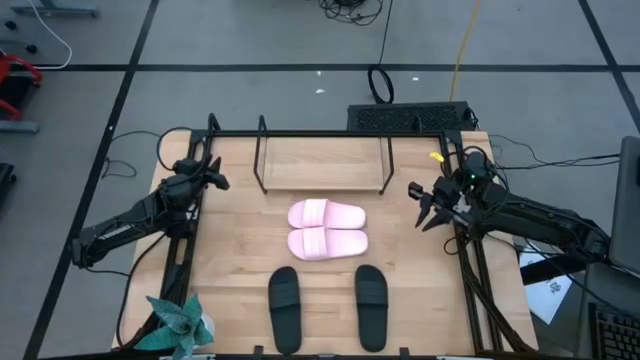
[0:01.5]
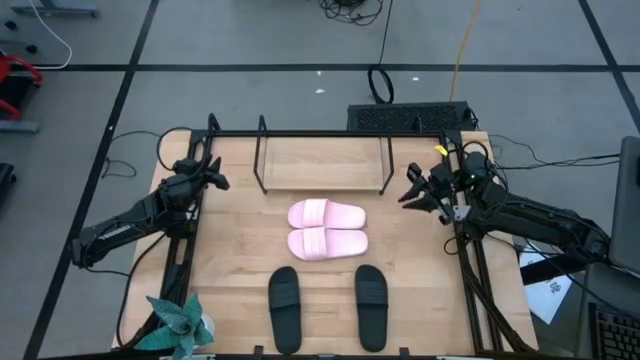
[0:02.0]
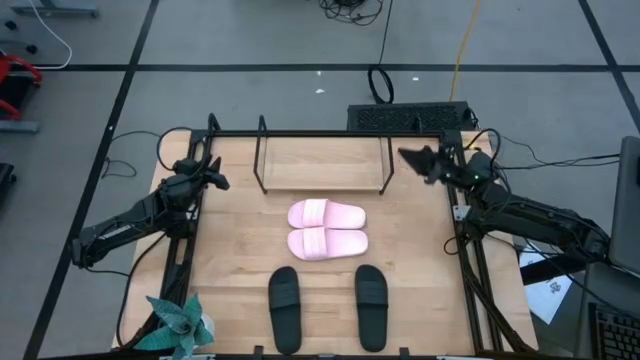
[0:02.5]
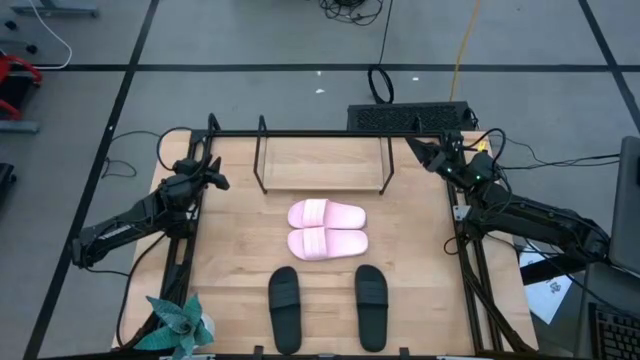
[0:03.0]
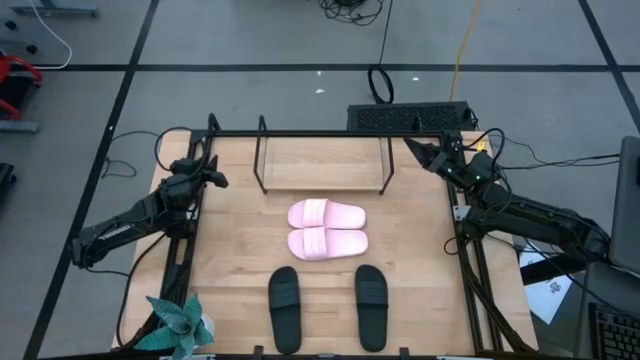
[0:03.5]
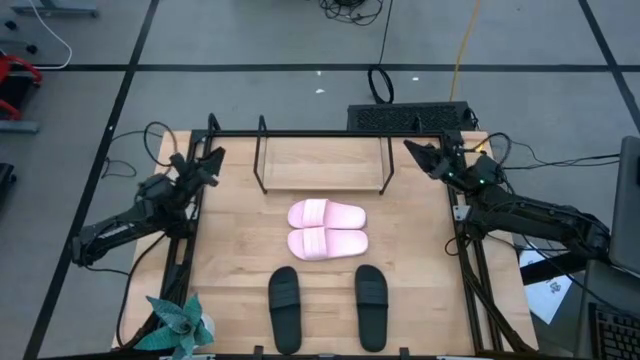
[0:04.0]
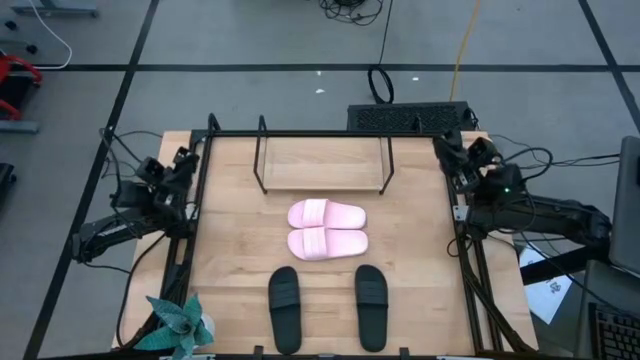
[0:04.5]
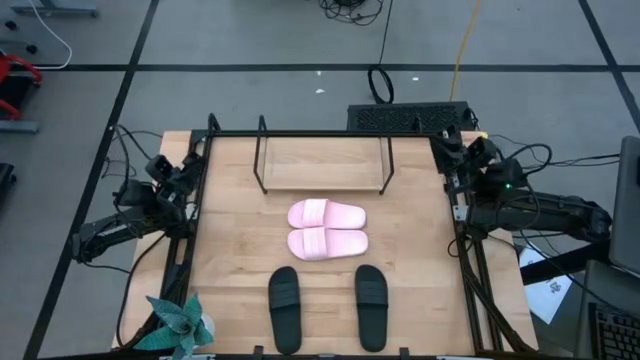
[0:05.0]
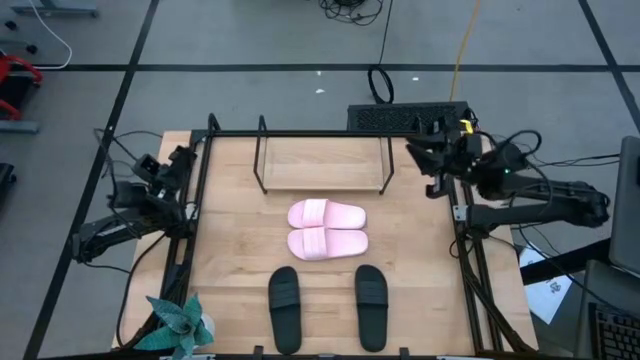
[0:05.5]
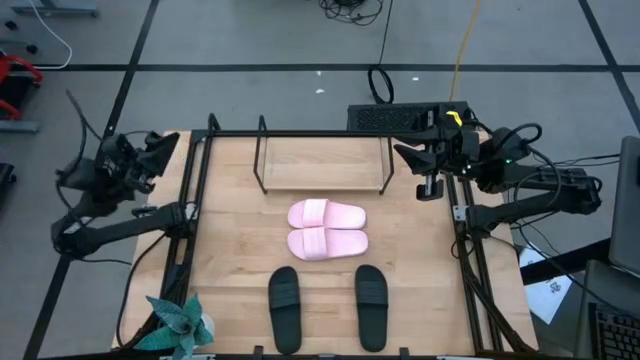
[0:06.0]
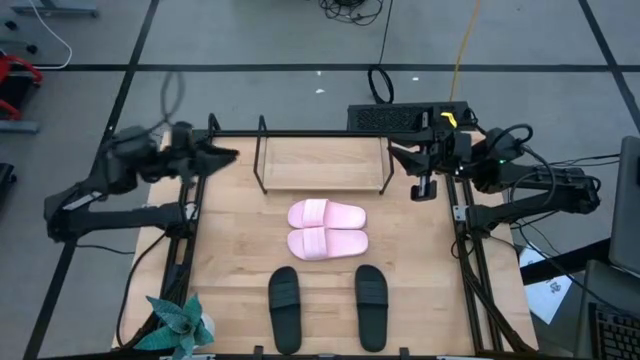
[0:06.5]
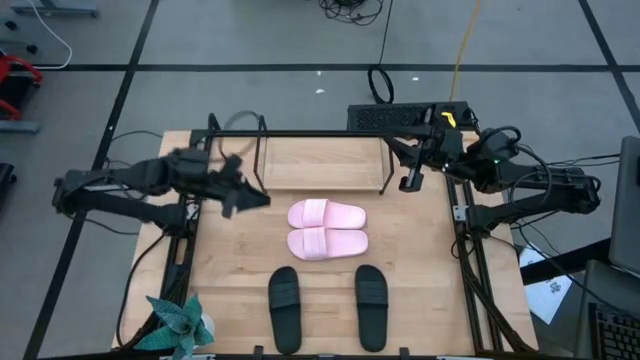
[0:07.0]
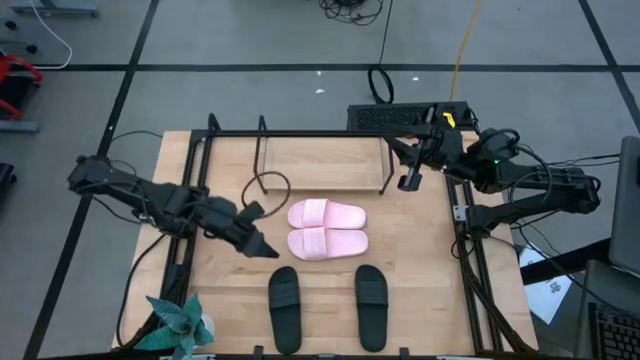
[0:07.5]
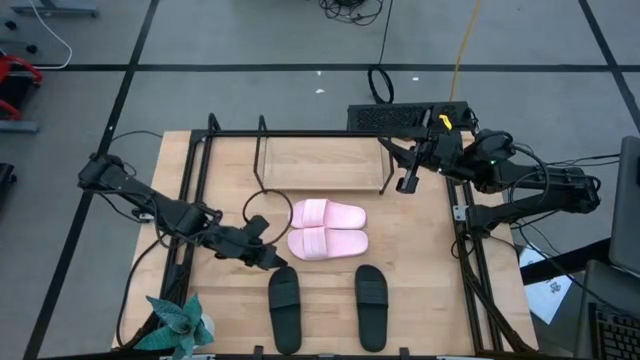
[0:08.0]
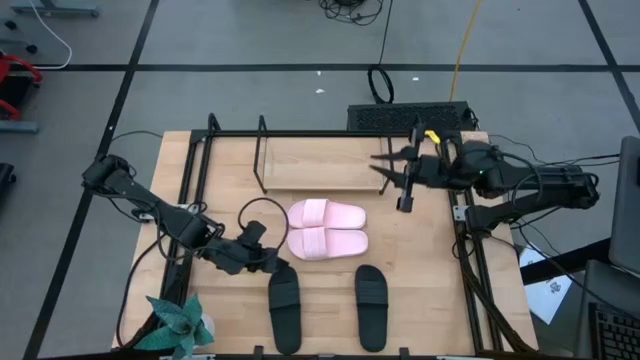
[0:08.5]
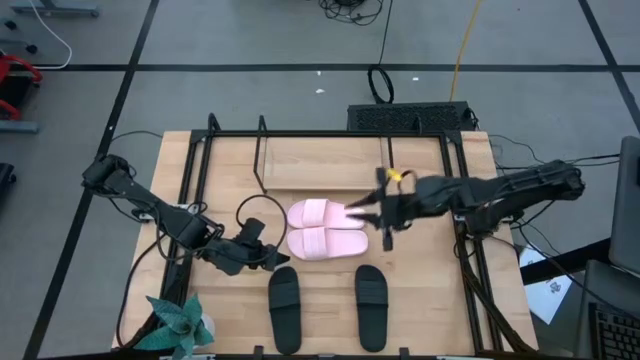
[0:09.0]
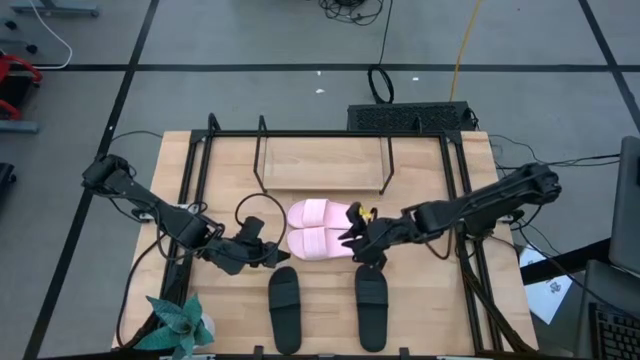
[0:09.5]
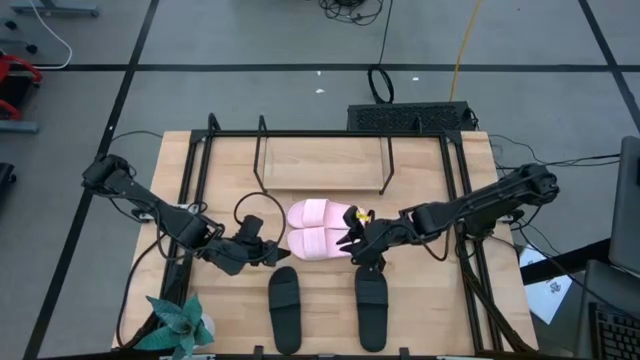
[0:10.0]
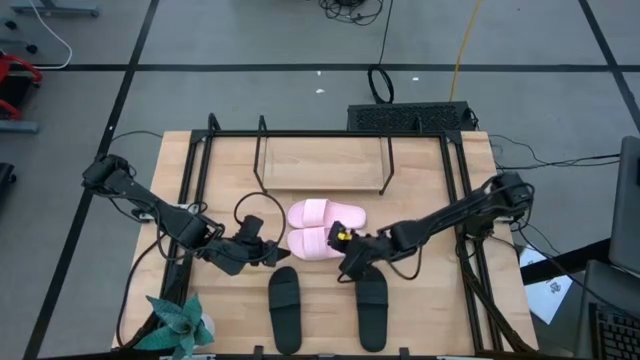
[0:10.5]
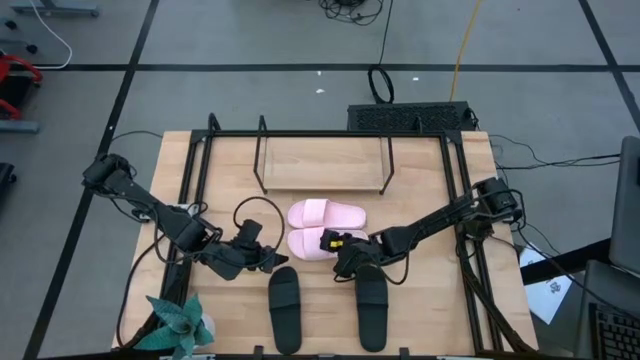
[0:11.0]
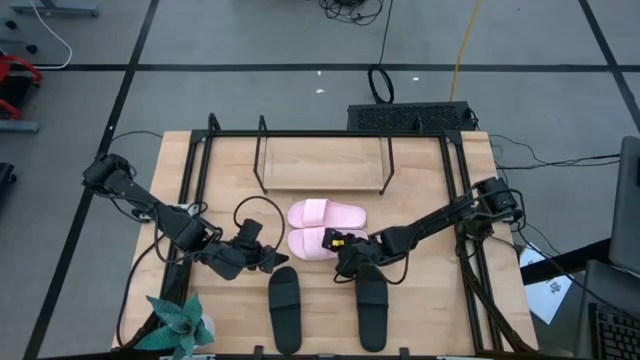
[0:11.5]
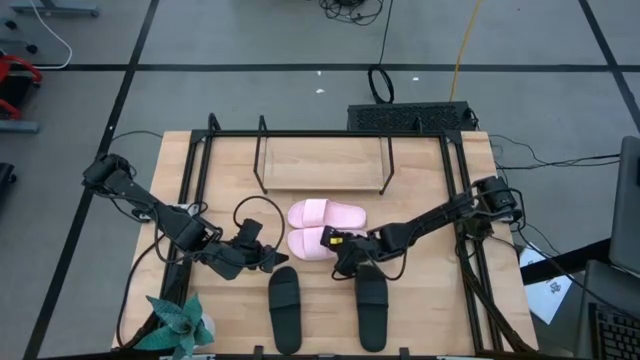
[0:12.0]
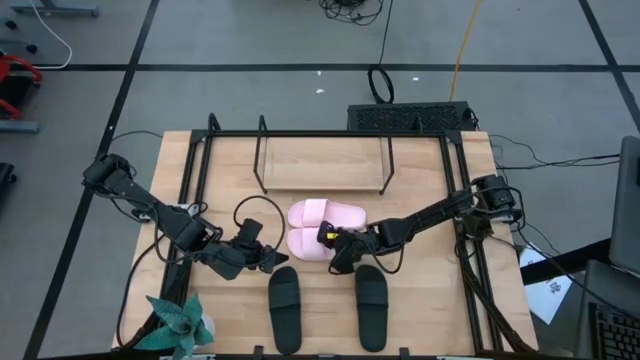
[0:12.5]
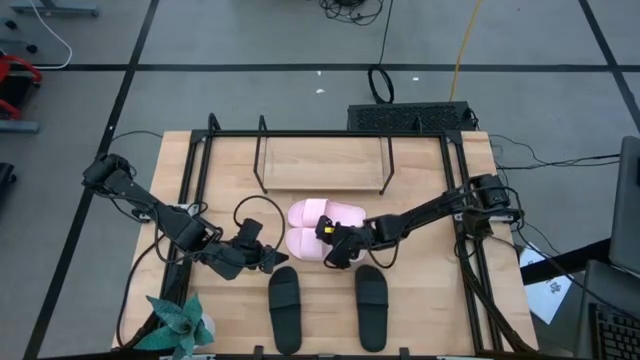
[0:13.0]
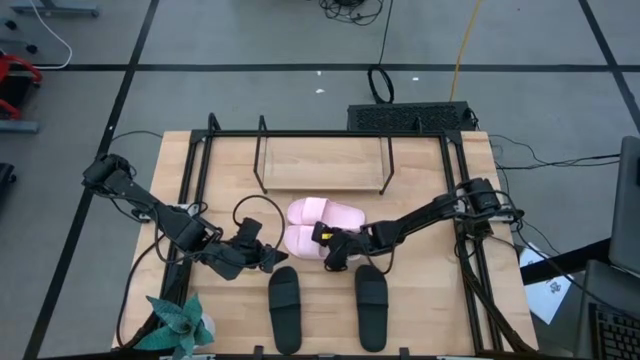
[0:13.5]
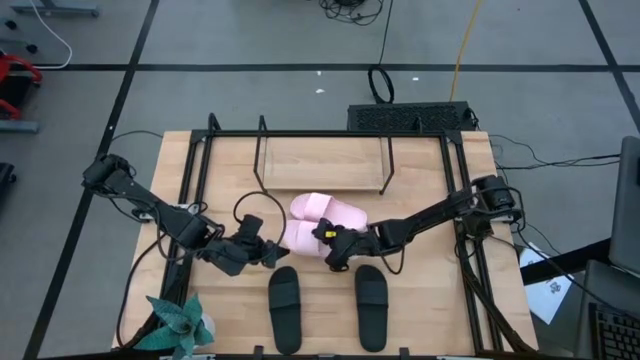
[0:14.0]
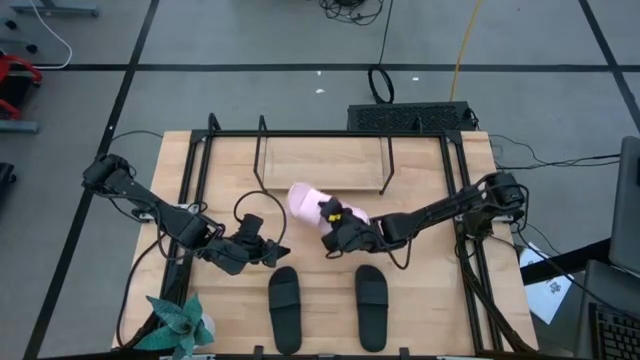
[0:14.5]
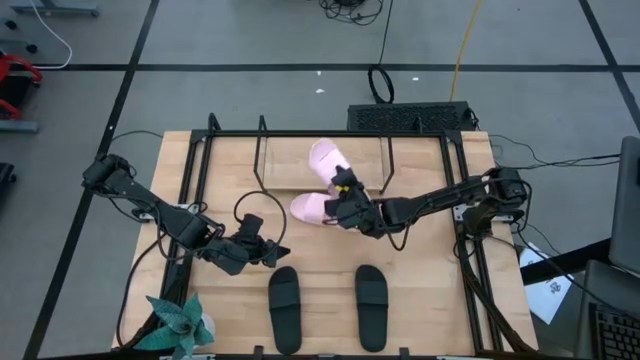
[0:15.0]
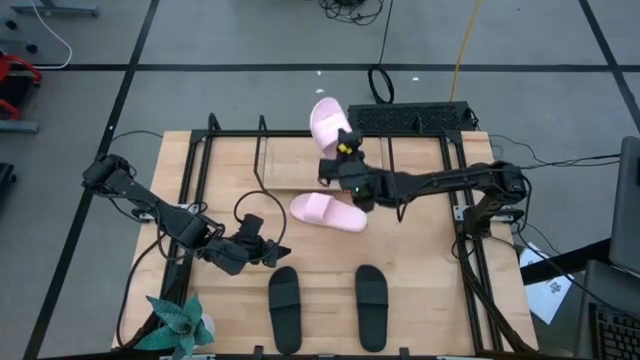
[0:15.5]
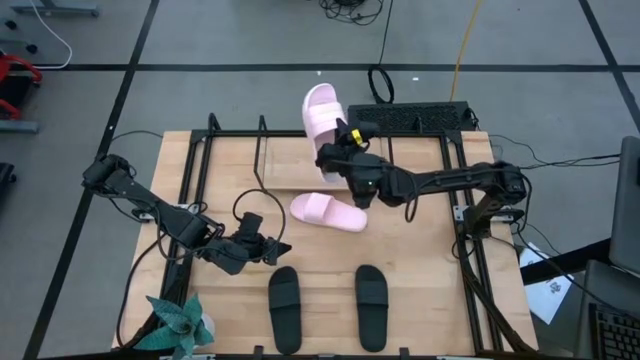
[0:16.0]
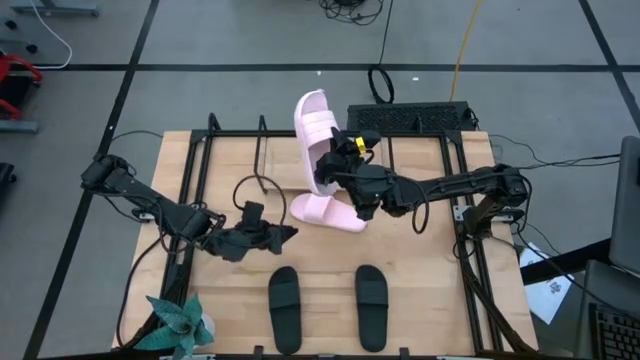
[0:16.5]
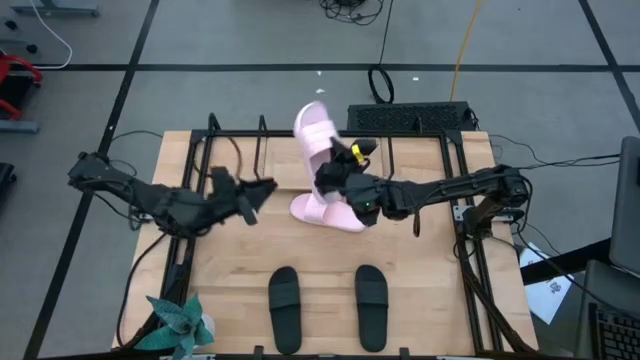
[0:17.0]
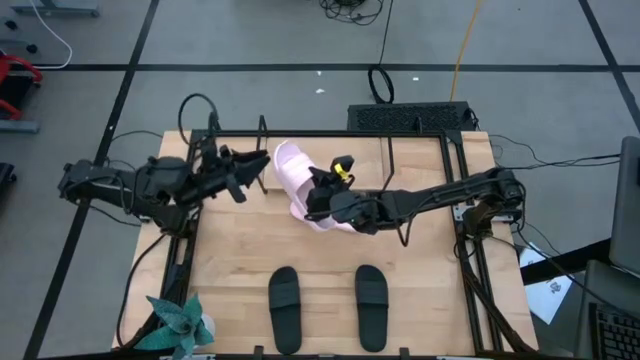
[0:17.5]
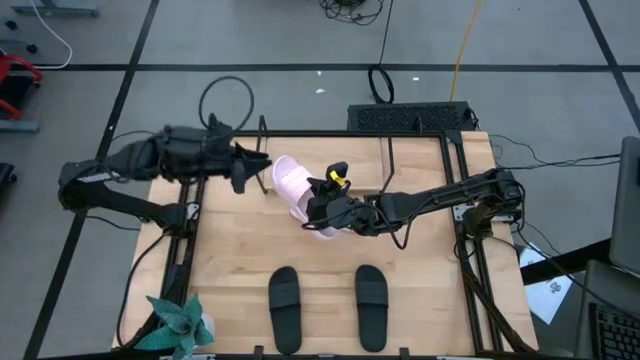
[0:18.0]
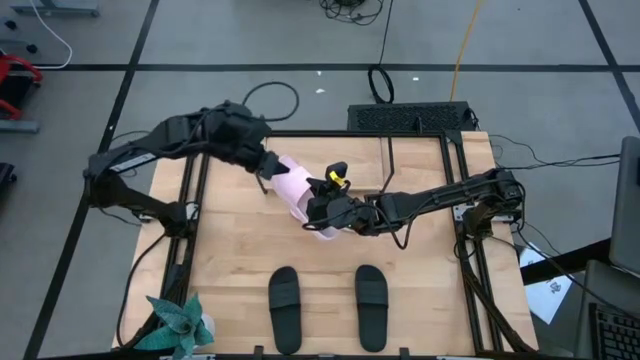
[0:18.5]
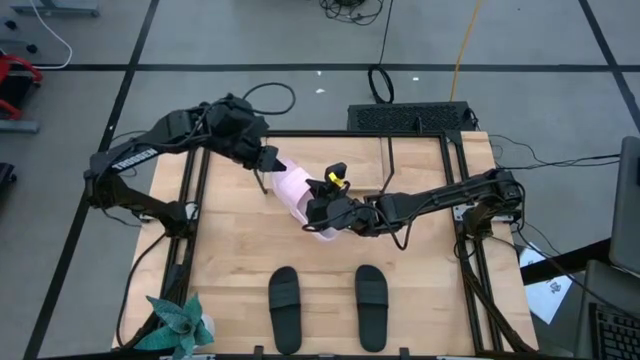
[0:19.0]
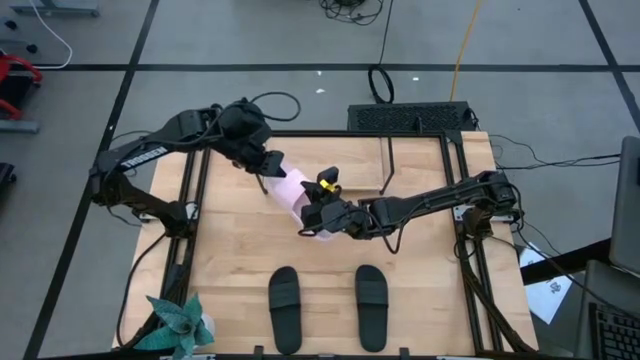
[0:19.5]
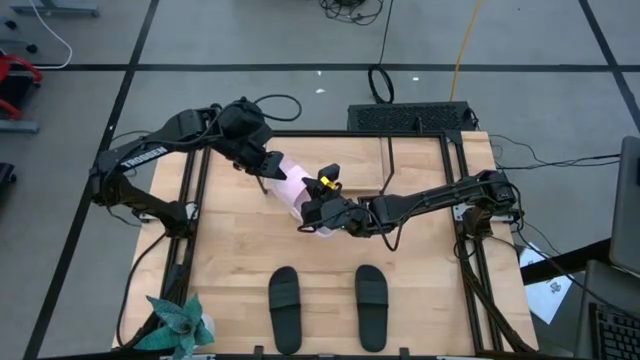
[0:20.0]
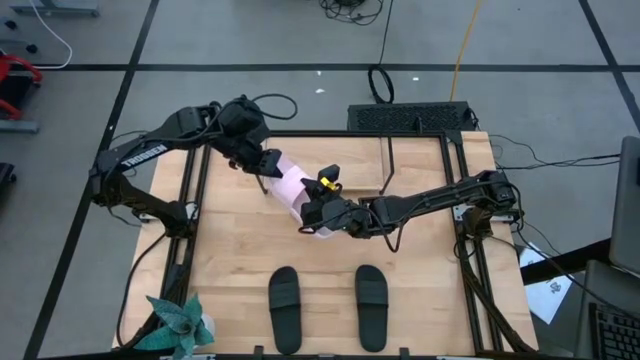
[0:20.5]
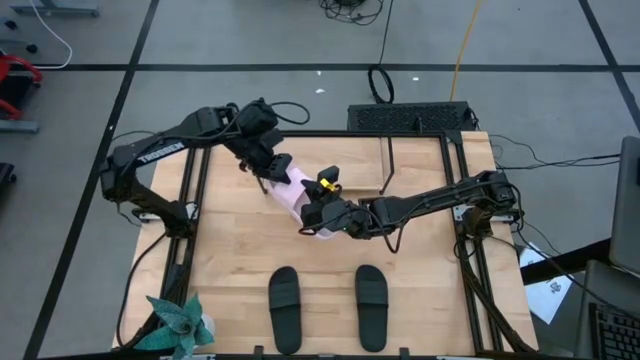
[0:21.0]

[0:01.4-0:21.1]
Task: Pick and place slides into the shelf
Put the bottom pink slide on the shelf

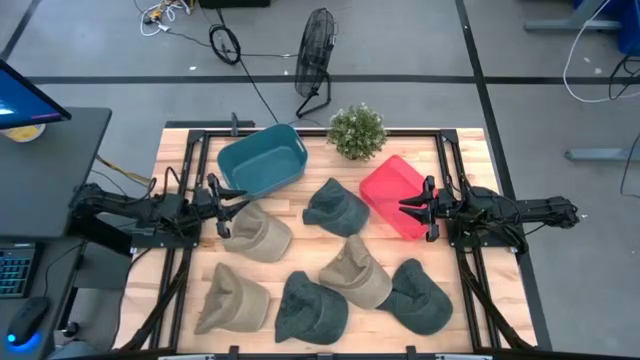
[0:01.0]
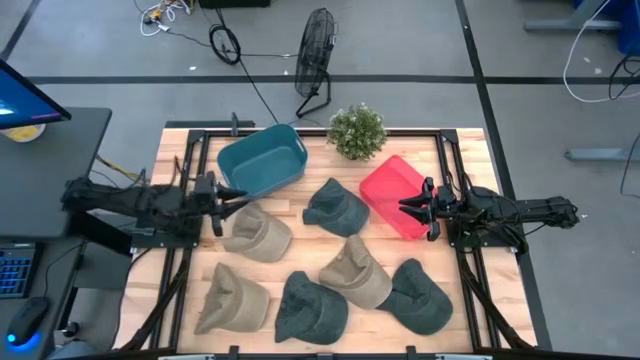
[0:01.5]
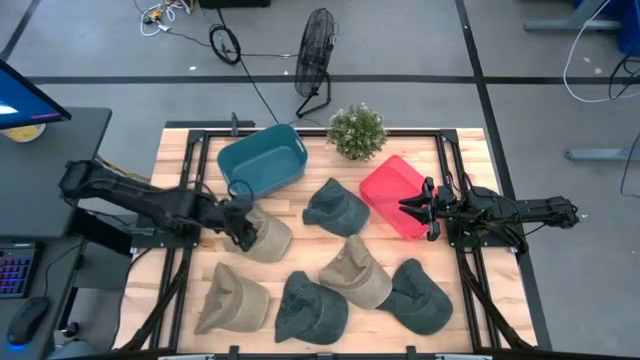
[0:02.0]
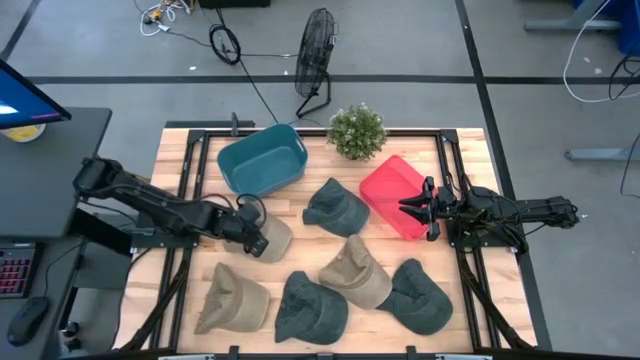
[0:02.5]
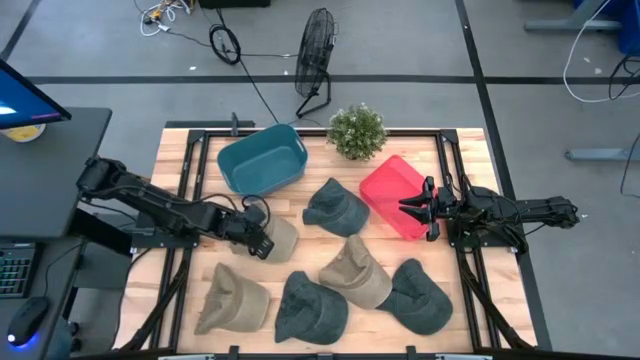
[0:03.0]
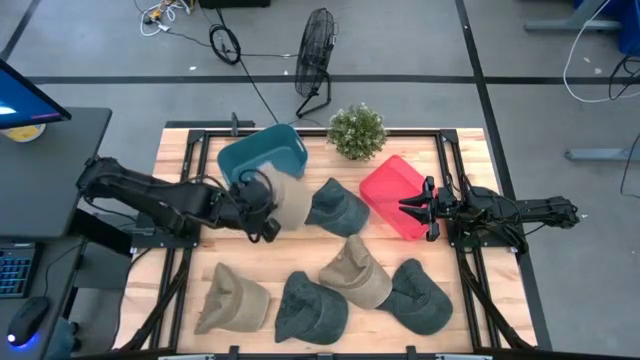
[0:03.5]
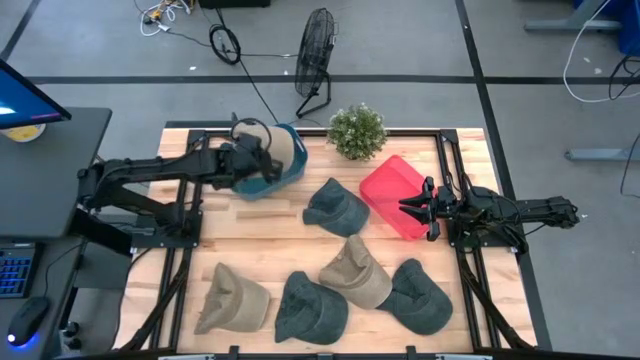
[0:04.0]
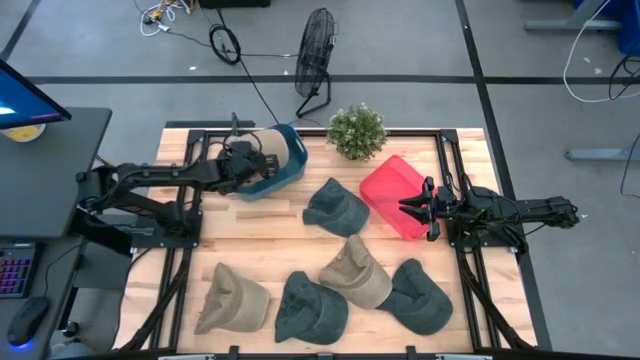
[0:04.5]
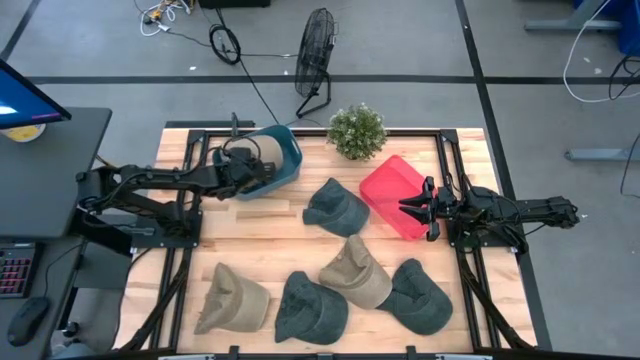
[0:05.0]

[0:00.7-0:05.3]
Task: Pick & Place hat
Put the top brown cap into the blue bin
